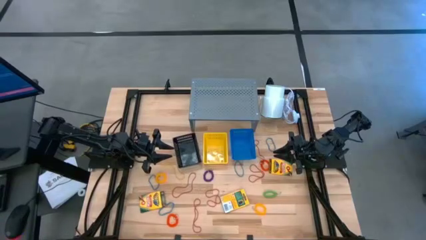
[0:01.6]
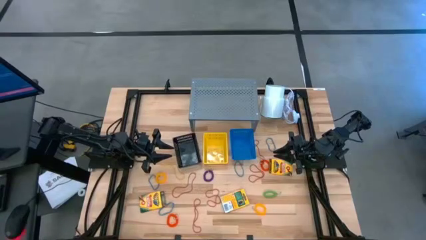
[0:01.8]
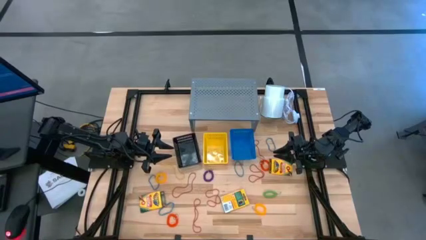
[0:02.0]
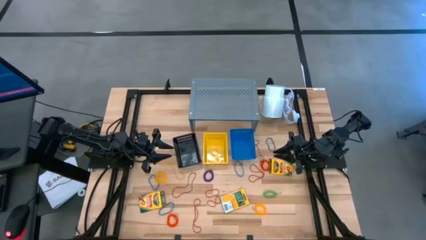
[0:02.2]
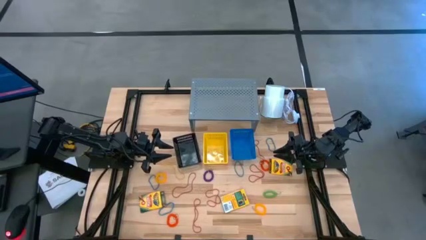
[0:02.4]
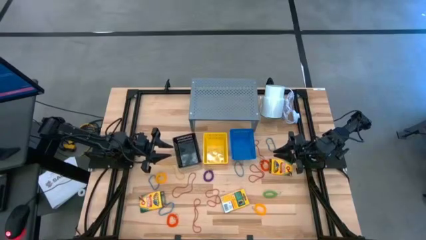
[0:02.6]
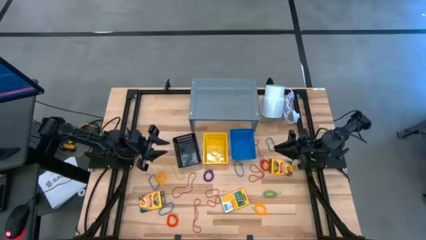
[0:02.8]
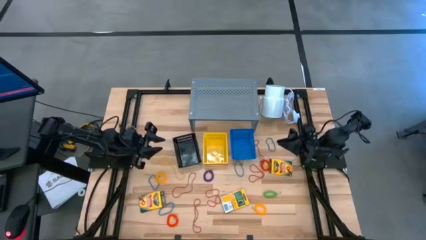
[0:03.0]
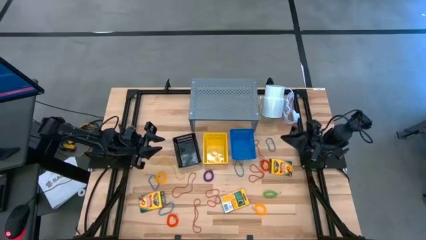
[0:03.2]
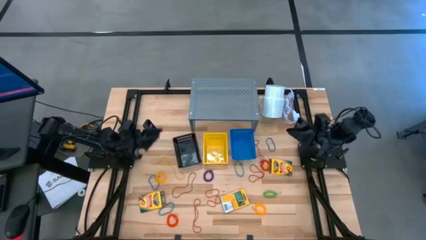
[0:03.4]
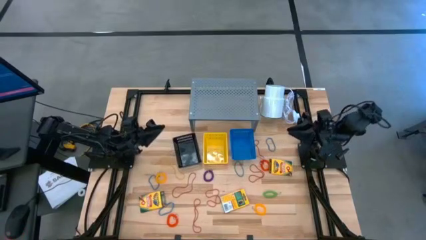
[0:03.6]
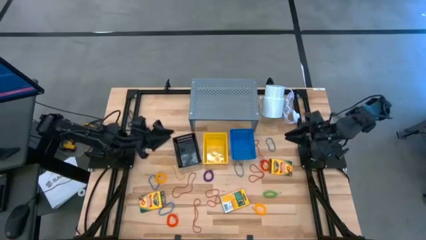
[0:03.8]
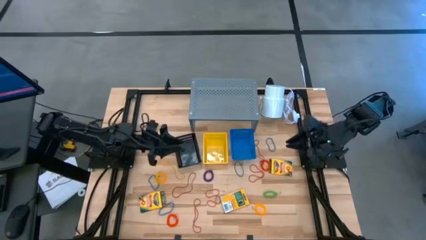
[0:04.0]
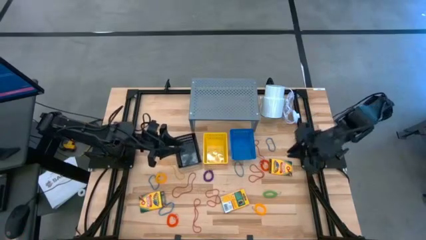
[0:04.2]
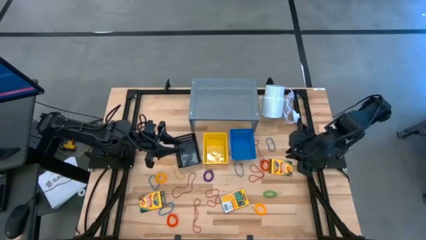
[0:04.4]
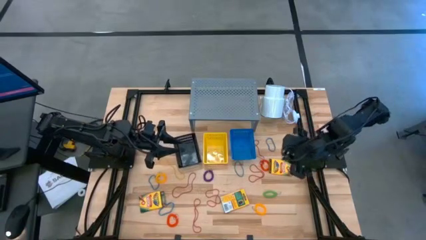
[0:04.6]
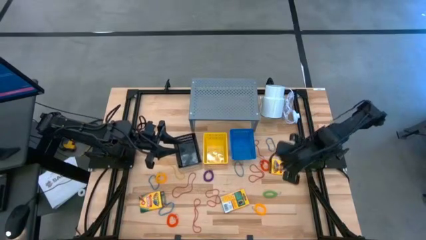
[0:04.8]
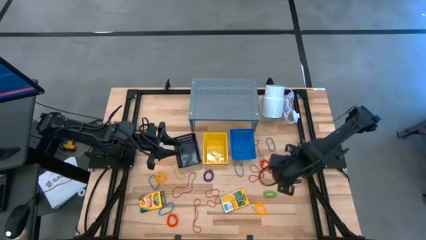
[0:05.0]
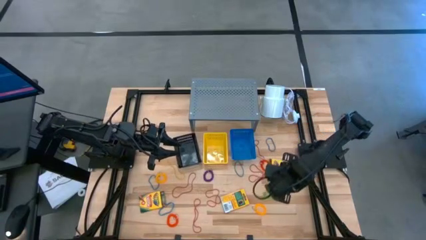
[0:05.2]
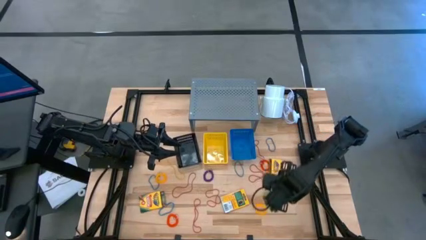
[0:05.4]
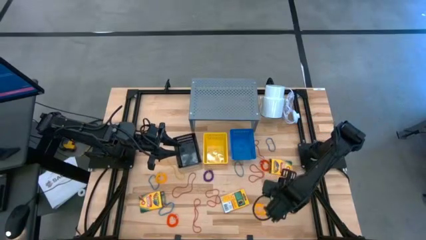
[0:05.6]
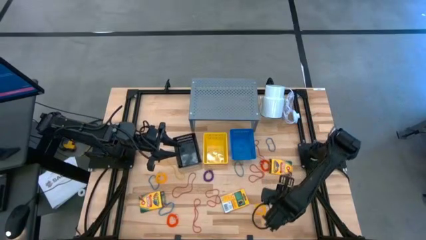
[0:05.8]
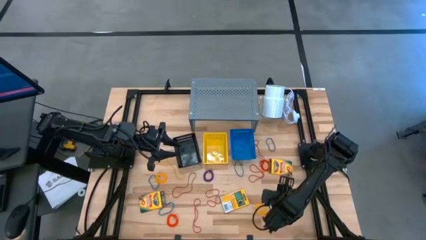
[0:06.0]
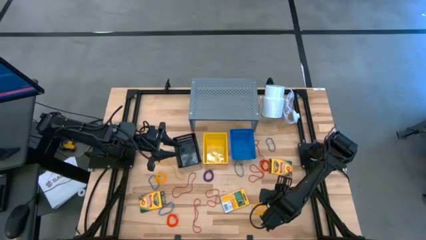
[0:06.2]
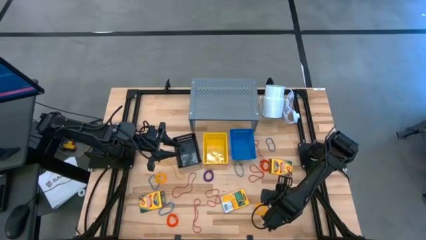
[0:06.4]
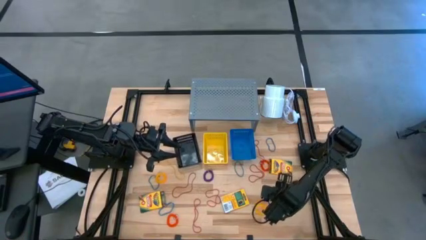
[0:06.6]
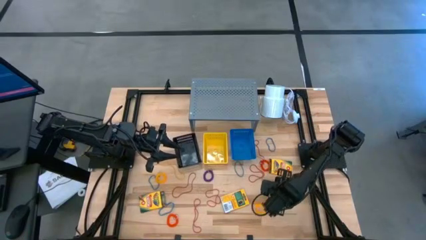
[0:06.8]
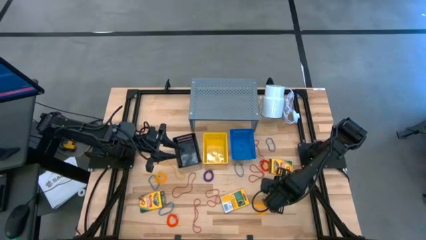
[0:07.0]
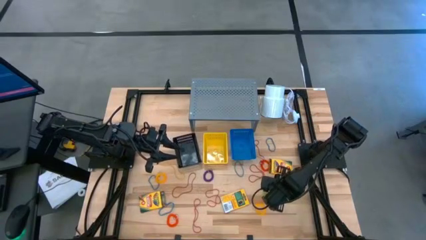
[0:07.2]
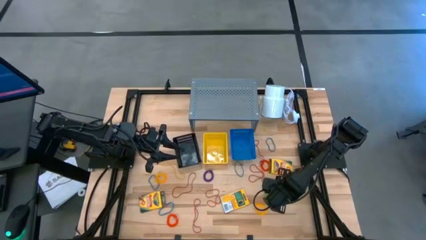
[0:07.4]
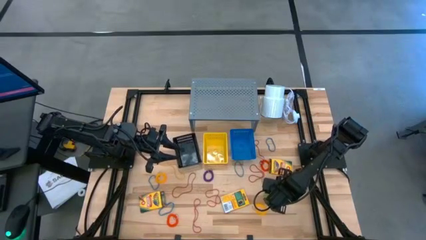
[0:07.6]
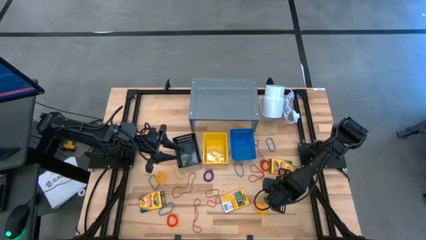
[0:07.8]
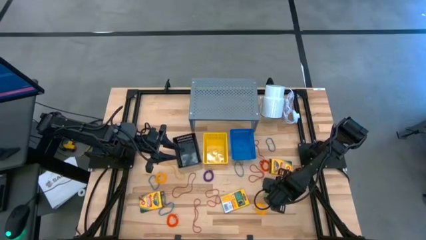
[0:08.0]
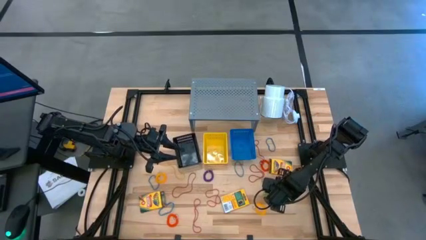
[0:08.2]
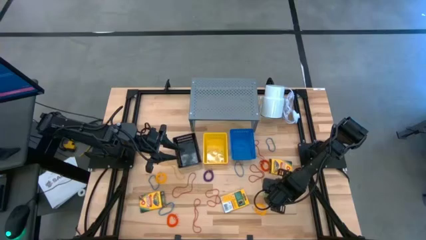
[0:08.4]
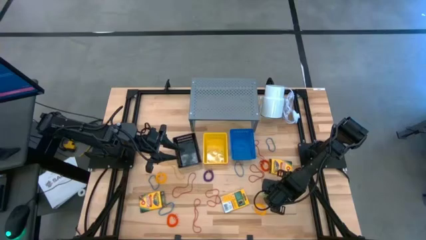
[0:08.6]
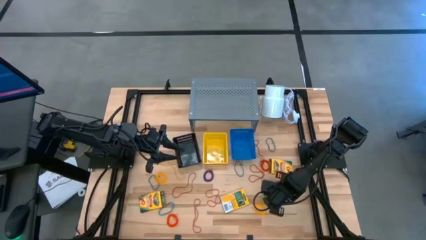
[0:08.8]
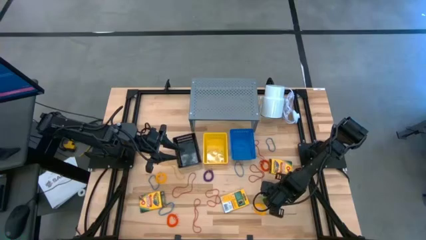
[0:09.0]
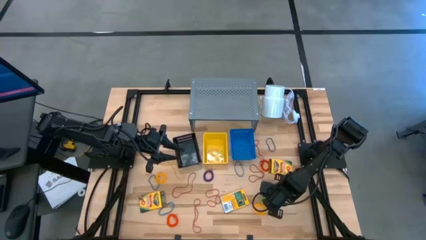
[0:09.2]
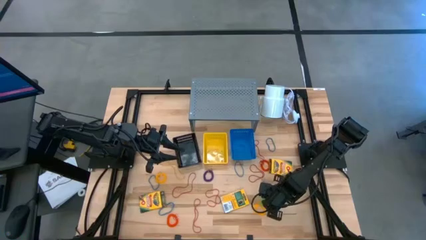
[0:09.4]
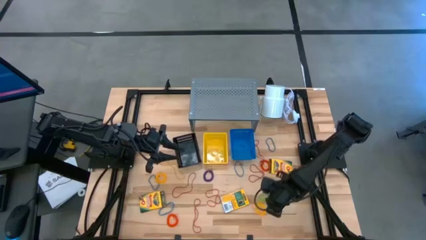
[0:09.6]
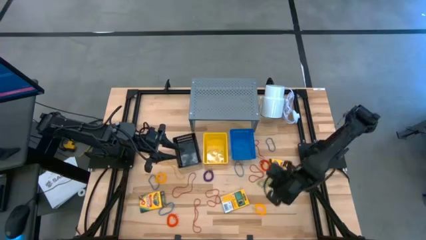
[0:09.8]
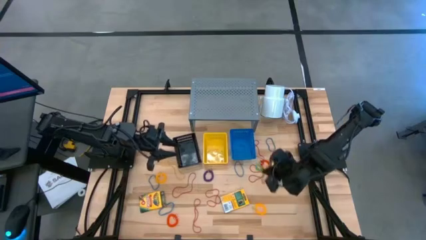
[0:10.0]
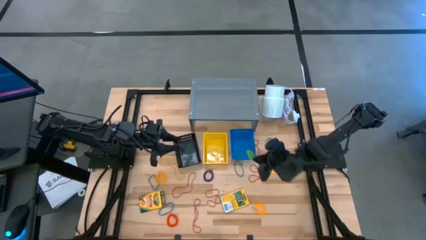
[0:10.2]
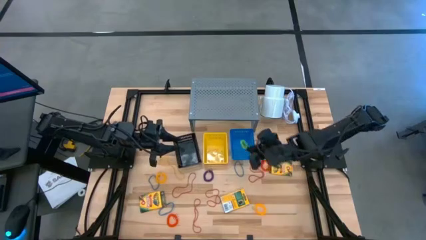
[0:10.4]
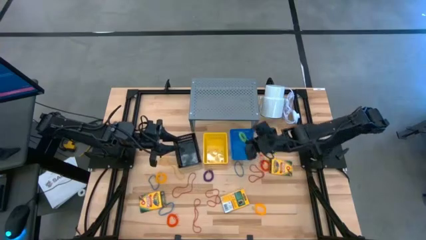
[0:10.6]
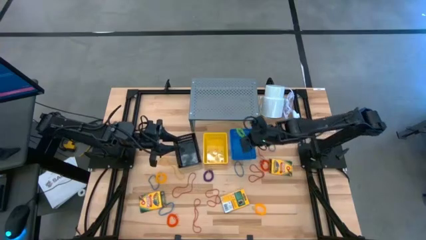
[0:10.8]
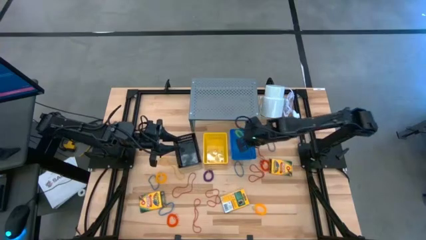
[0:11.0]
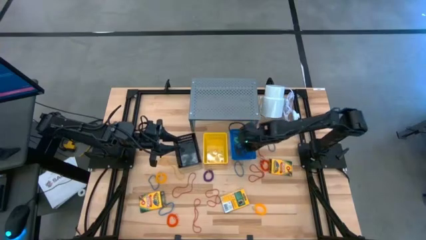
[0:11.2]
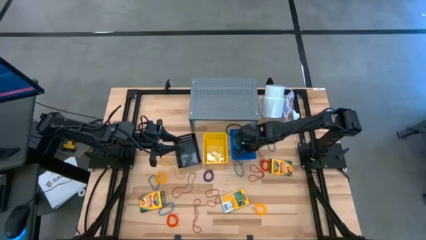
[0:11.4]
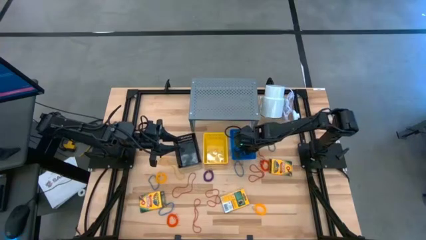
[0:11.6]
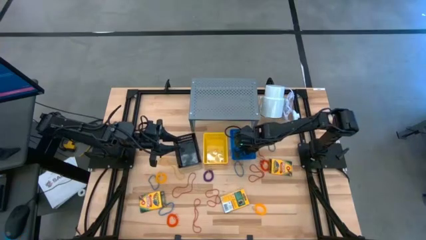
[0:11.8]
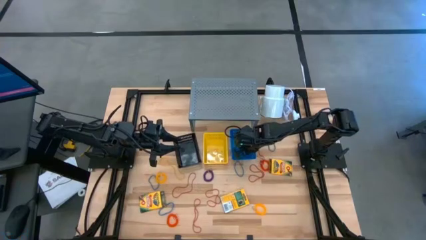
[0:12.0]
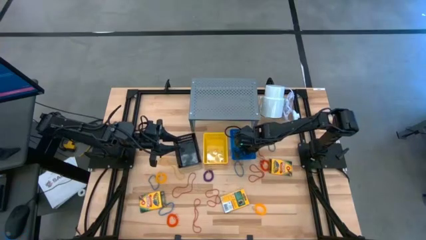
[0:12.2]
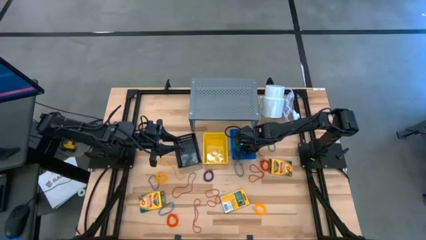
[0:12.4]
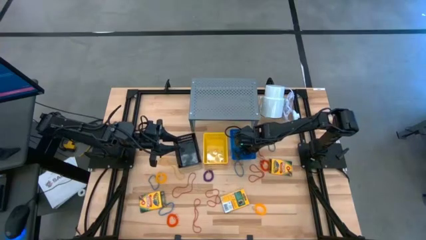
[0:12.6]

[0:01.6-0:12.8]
Task: Pick & Place Office Desk Supplies
Put the green spring keychain into the blue basket

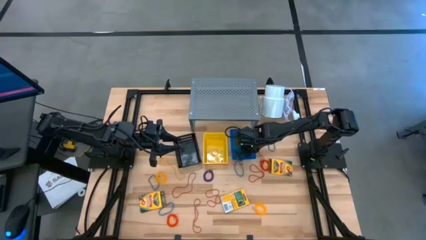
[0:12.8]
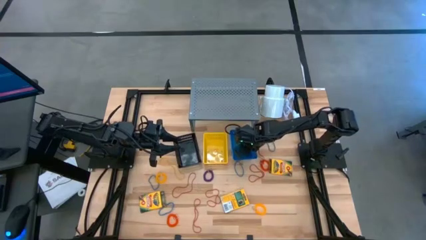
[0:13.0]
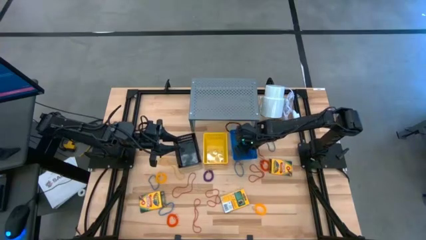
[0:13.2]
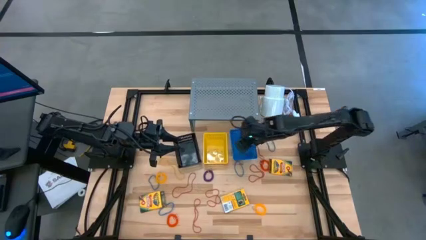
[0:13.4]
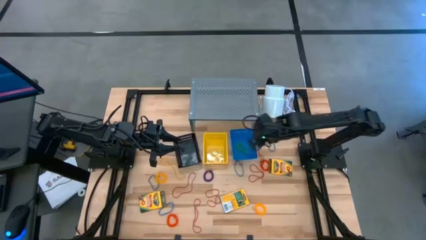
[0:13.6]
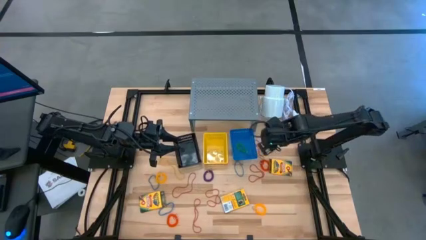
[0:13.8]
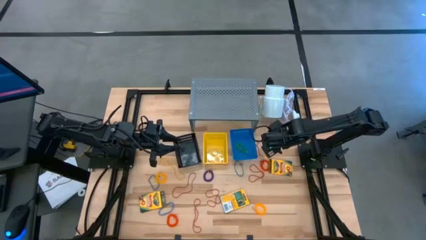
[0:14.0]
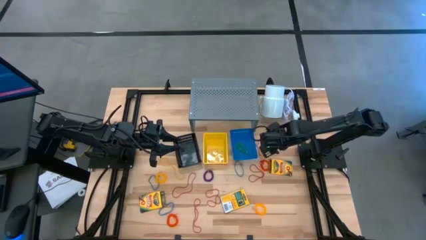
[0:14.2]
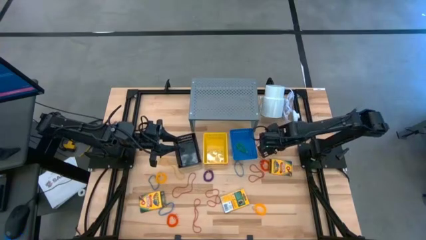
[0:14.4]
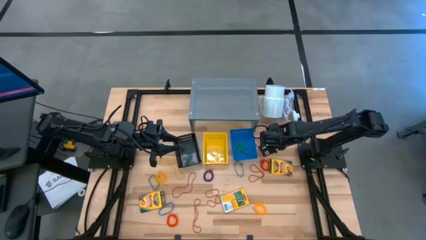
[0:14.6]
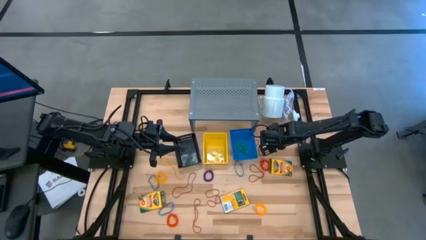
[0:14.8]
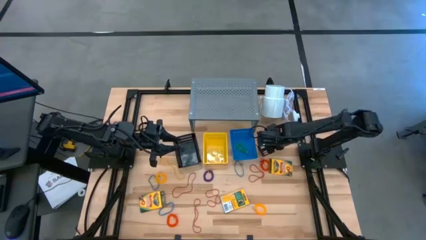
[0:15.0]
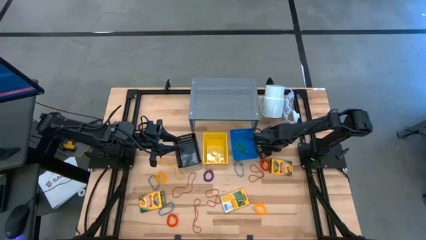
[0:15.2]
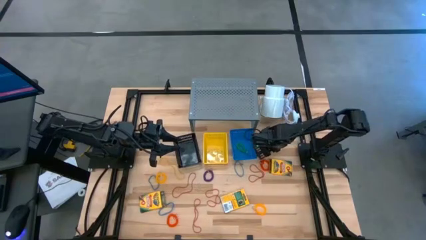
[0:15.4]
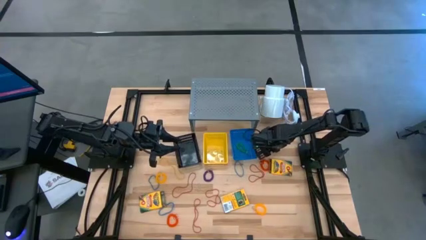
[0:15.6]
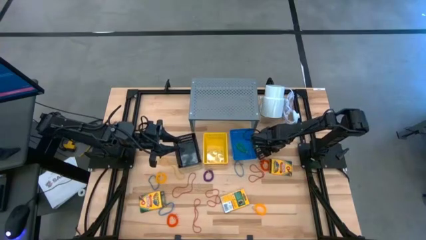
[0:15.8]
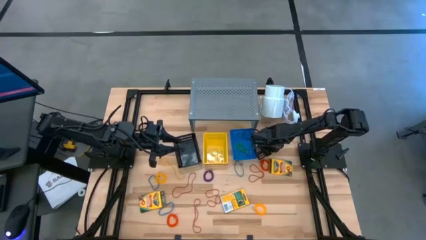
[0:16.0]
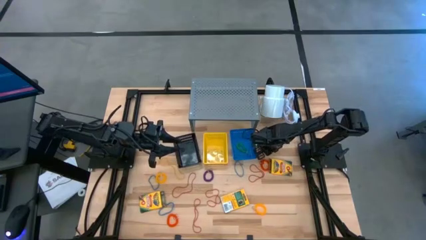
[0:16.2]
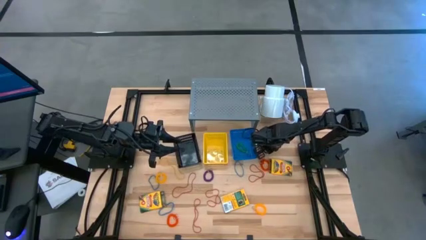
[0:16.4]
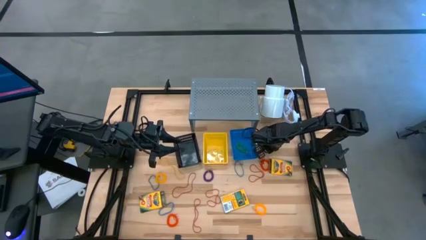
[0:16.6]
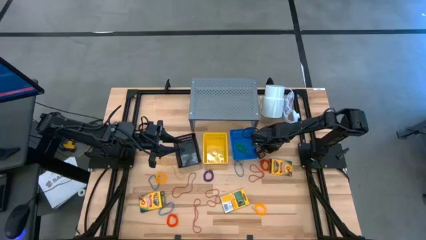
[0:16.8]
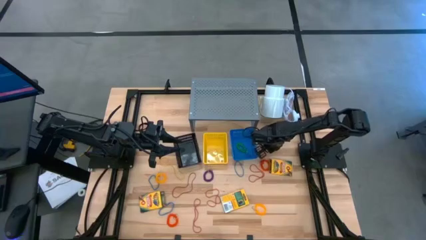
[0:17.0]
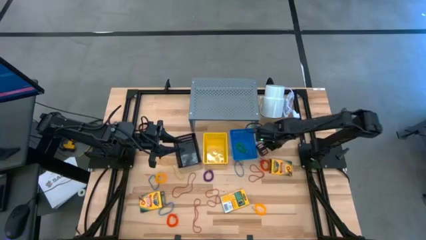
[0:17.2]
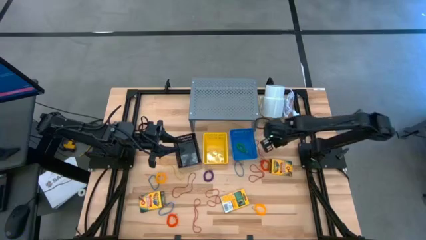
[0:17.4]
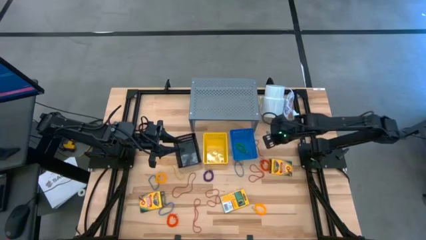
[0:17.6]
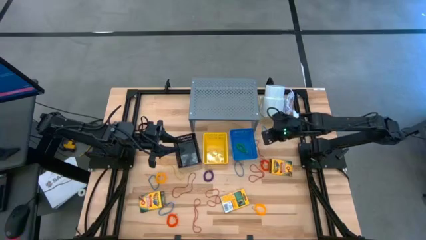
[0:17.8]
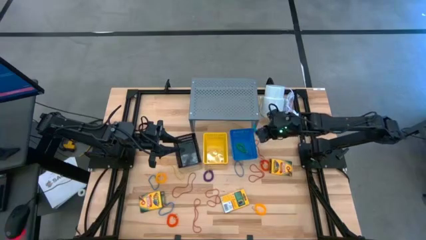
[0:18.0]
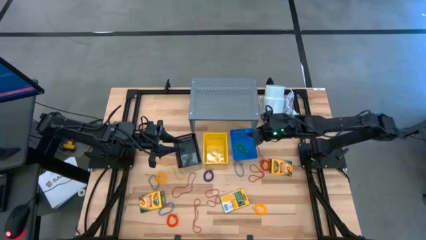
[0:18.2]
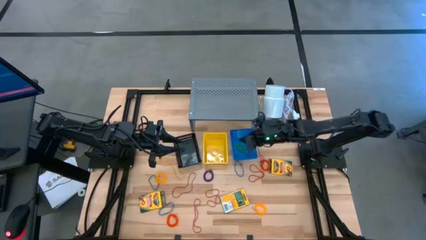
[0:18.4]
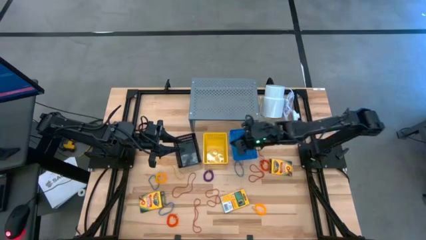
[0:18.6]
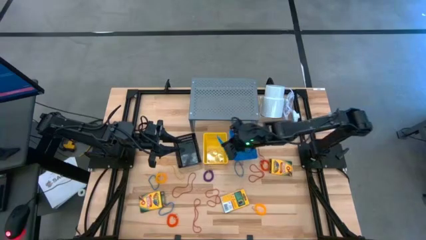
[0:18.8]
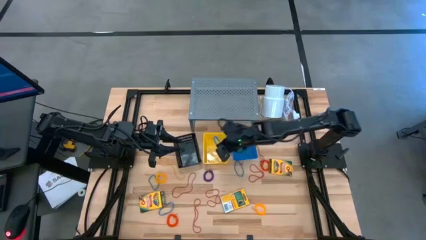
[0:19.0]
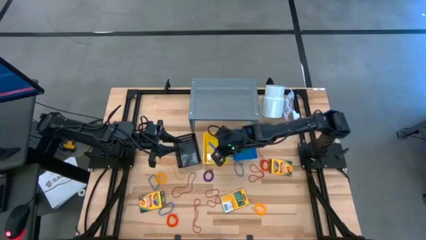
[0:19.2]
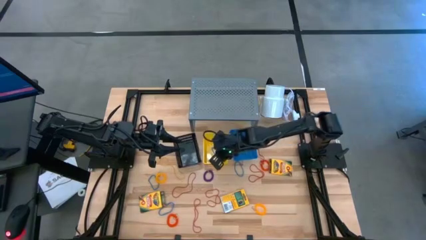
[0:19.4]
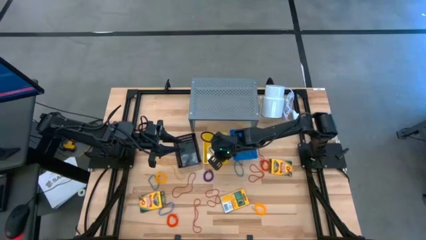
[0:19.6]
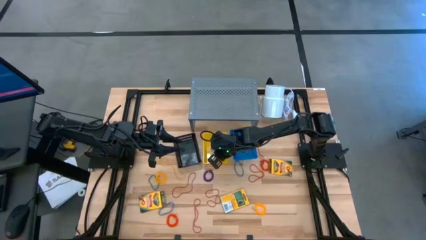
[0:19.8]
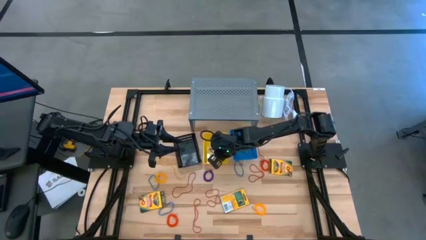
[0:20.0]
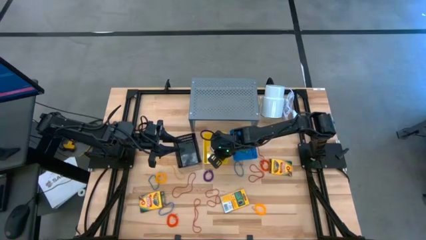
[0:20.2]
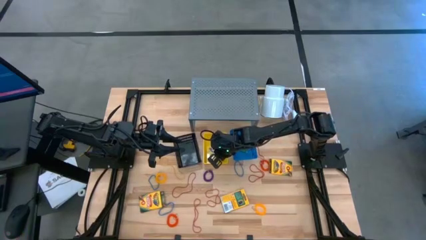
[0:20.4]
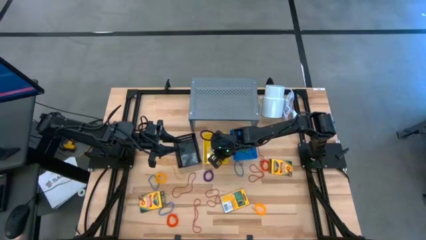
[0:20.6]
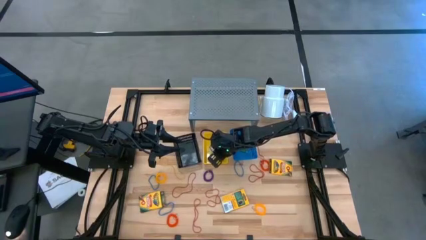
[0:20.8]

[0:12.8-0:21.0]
Put the blue rubber band into the yellow basket
